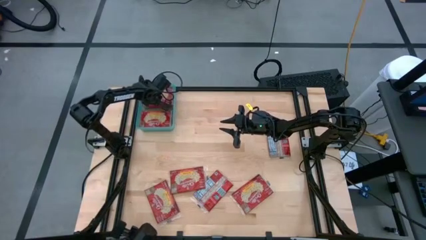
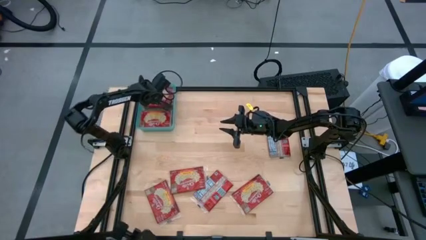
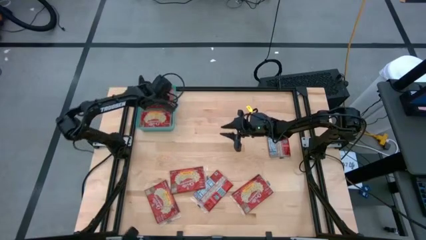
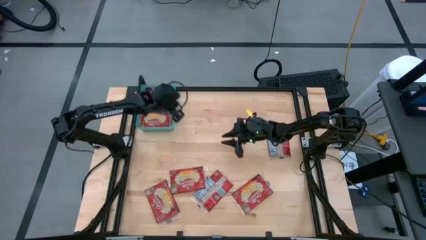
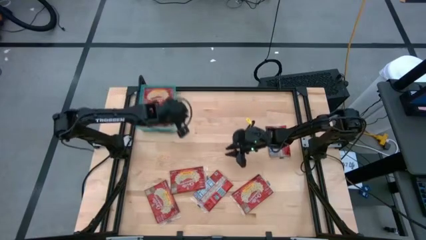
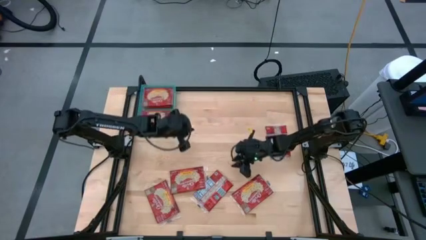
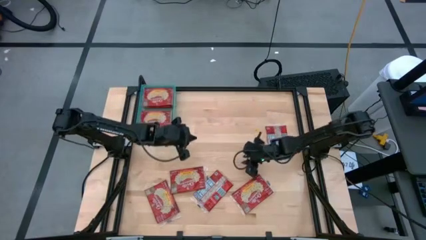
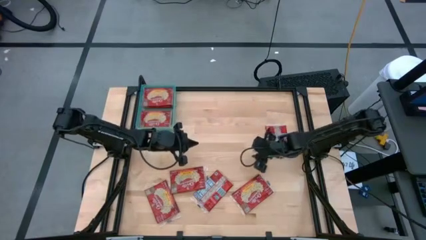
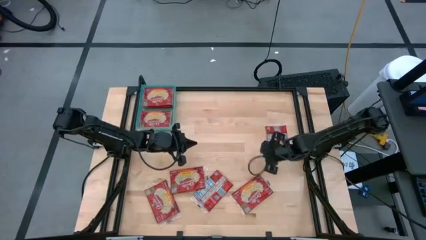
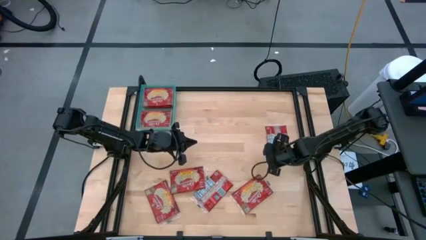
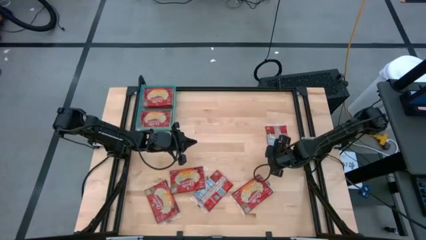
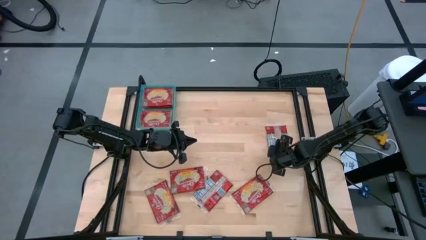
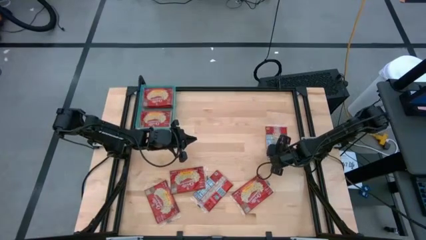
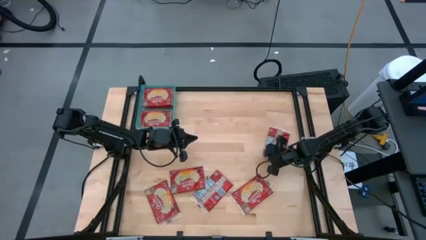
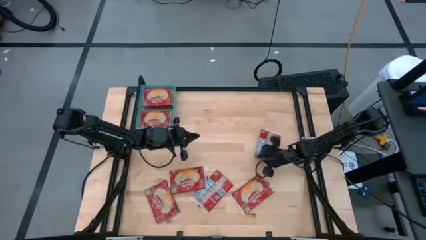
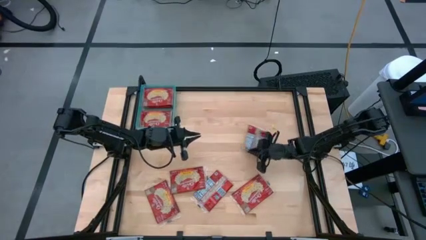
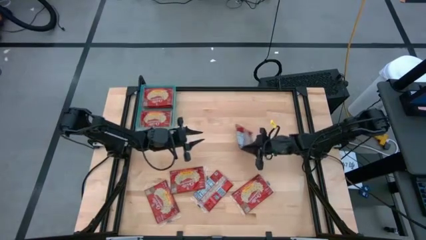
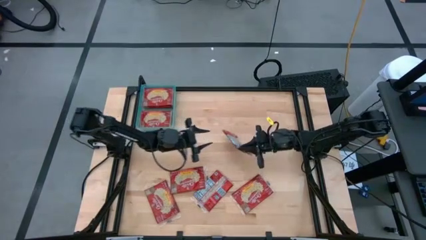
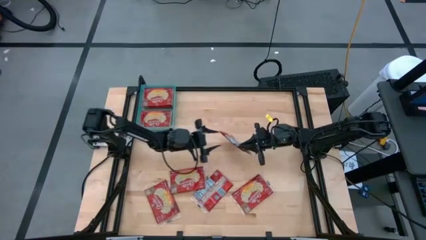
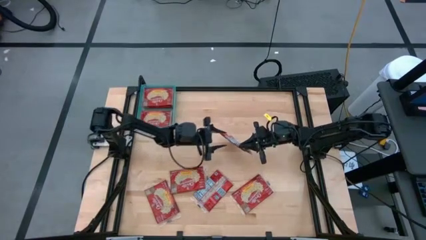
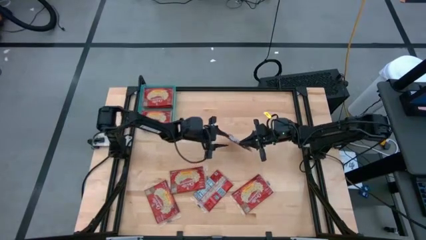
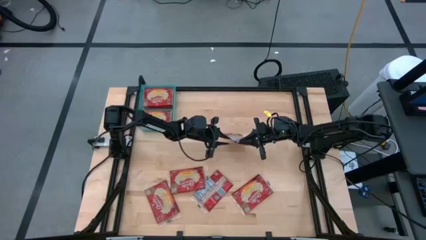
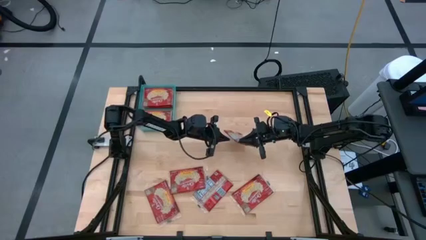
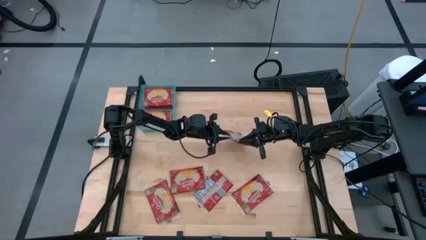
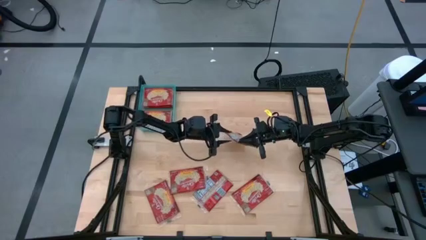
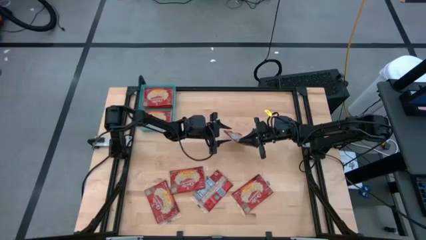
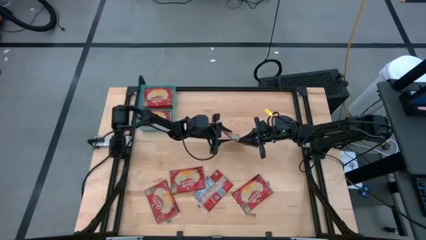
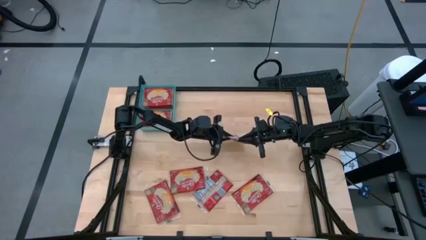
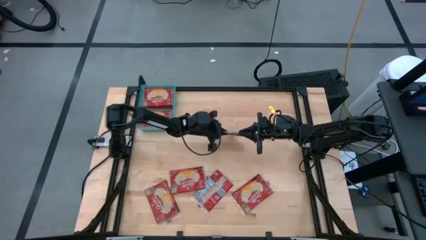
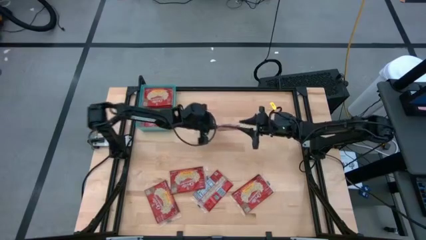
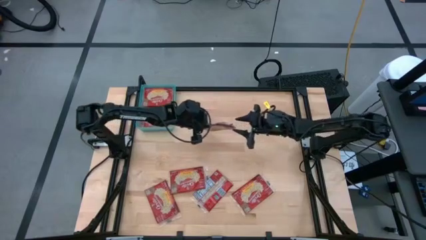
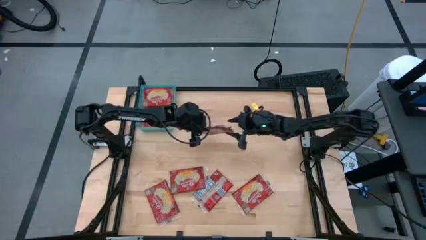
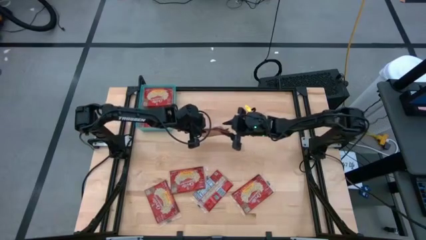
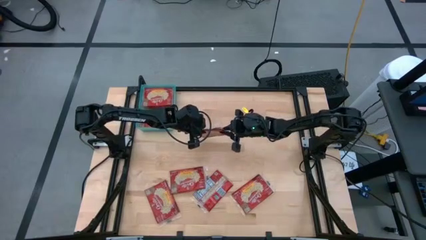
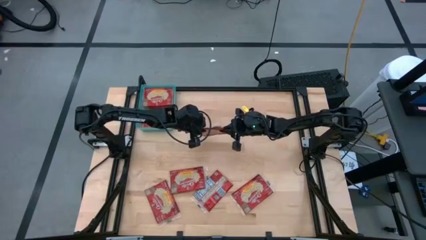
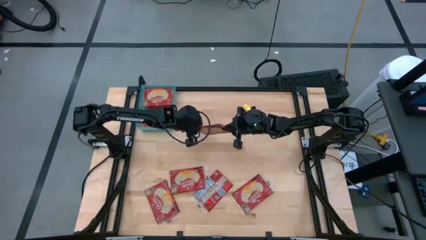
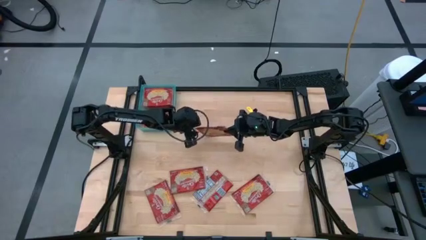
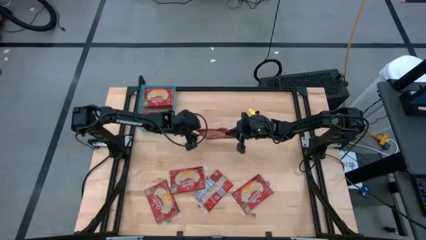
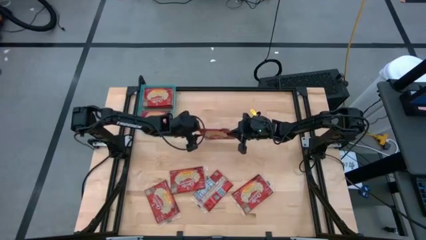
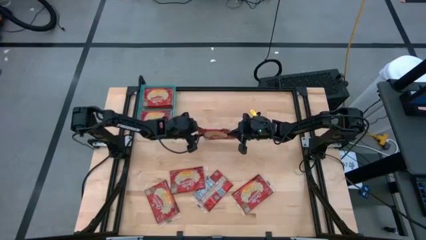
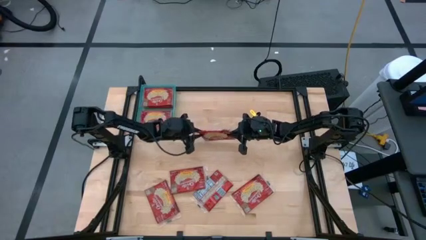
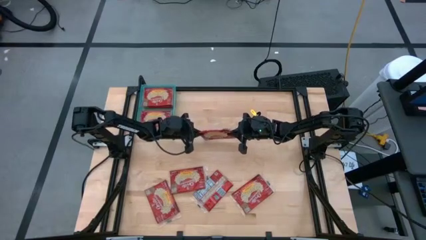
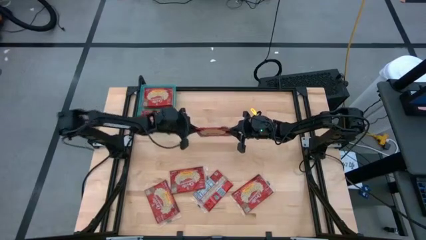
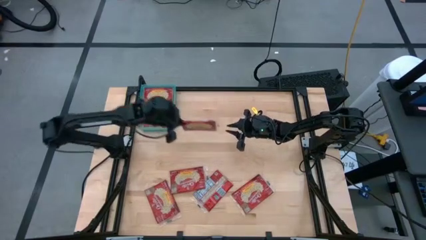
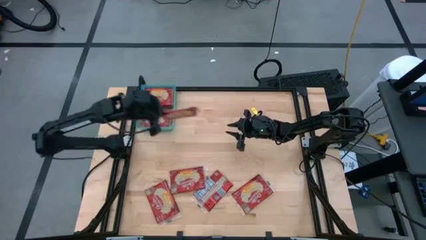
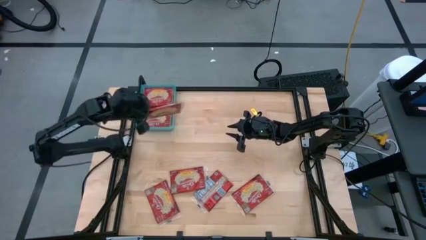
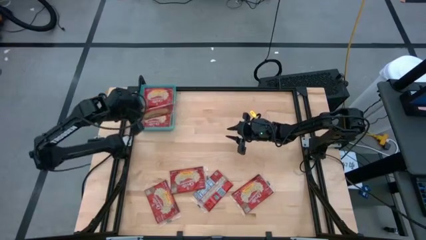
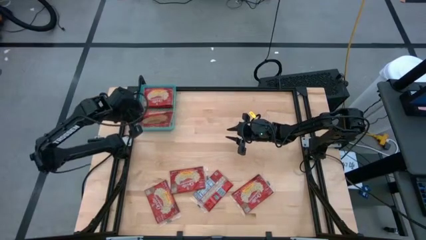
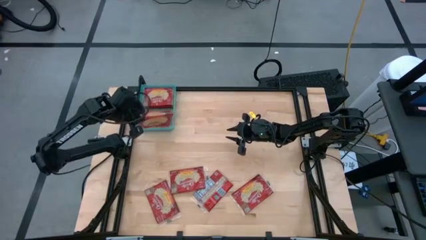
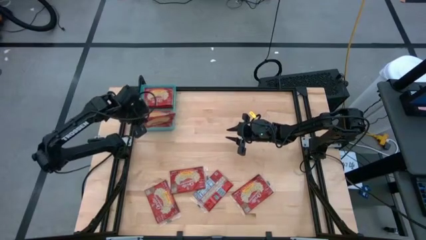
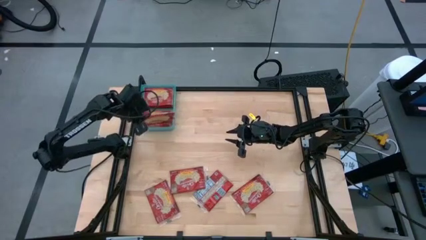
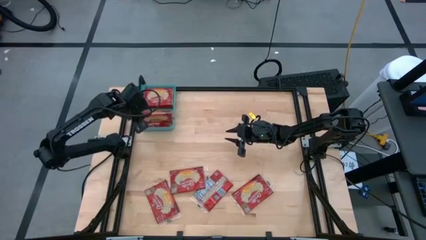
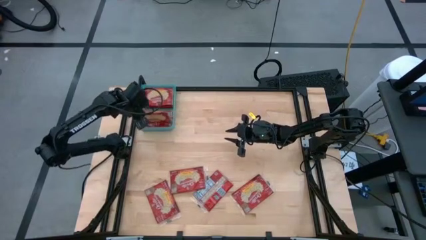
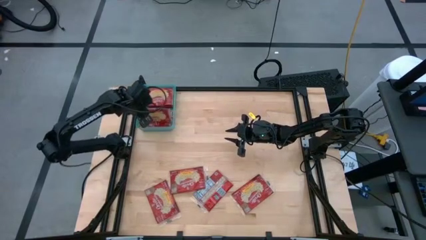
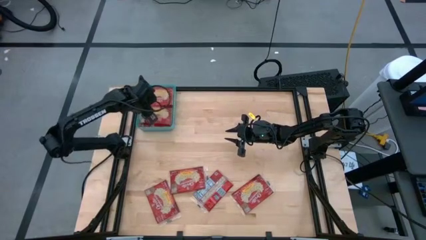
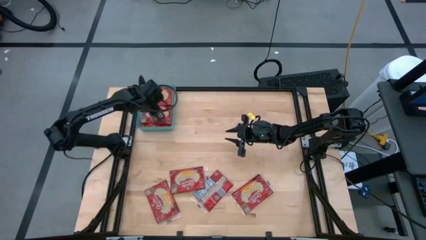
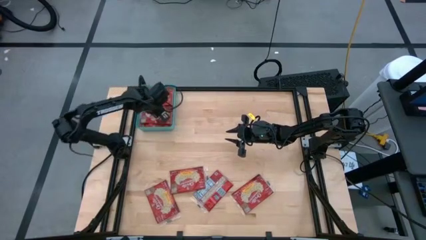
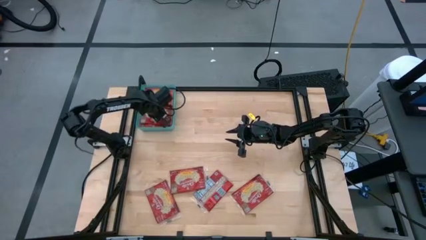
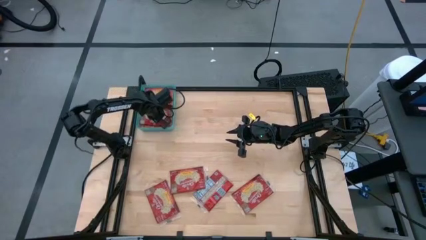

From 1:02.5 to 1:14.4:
Task: Sort popcorn bags into baskets
Put the popcorn bag into the blue bin
